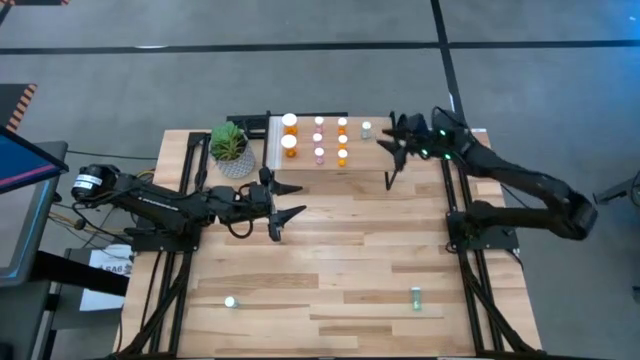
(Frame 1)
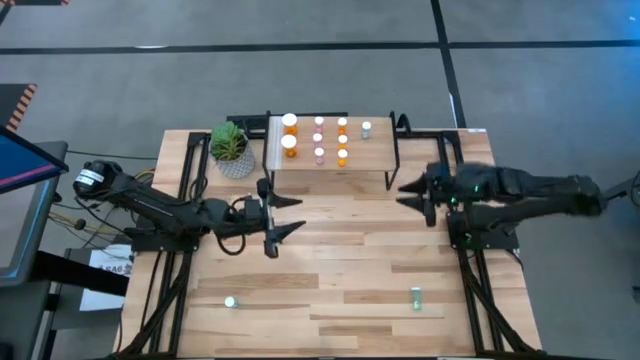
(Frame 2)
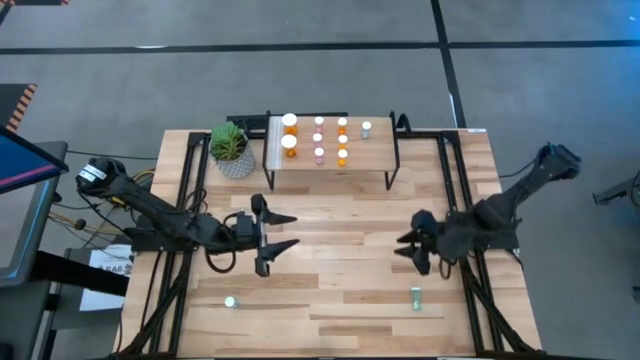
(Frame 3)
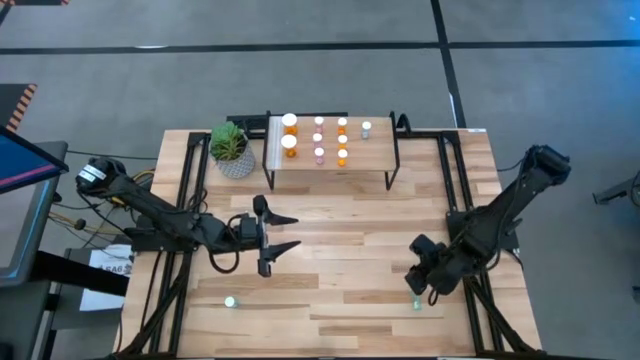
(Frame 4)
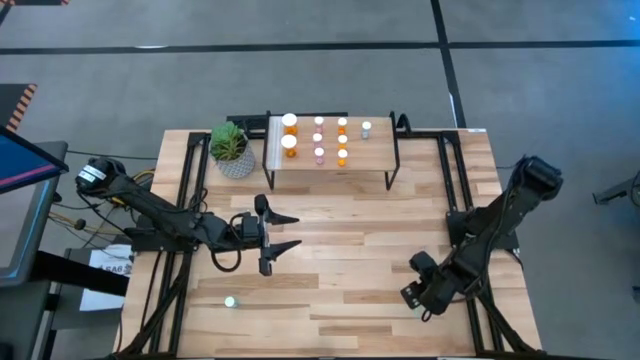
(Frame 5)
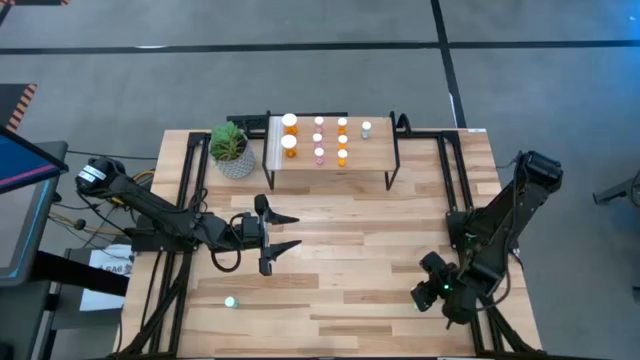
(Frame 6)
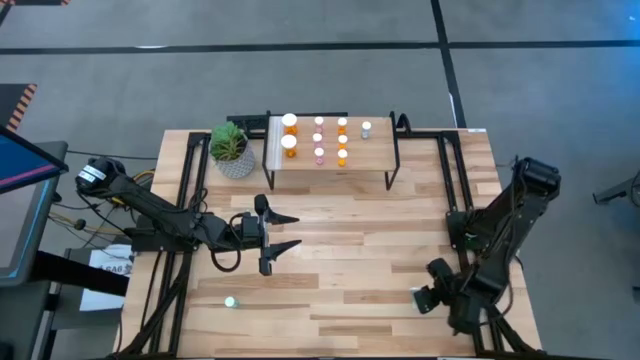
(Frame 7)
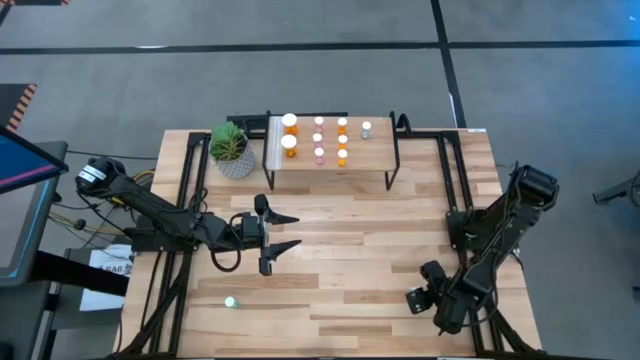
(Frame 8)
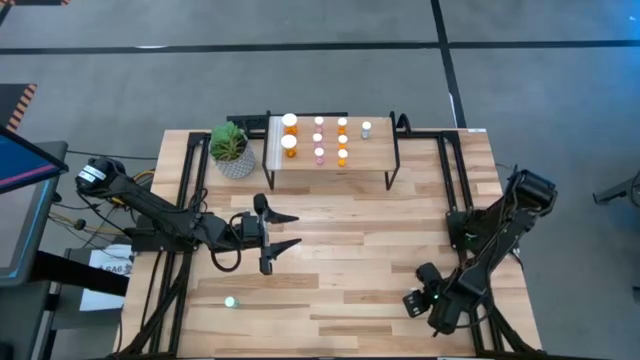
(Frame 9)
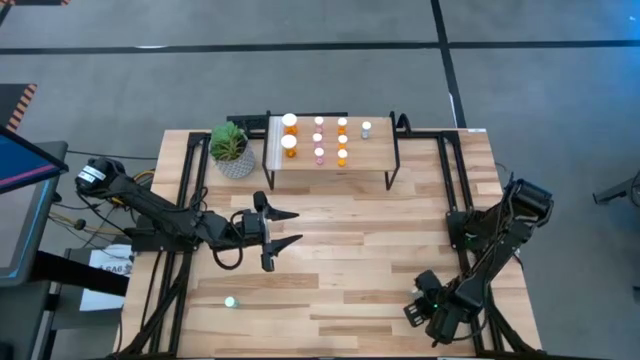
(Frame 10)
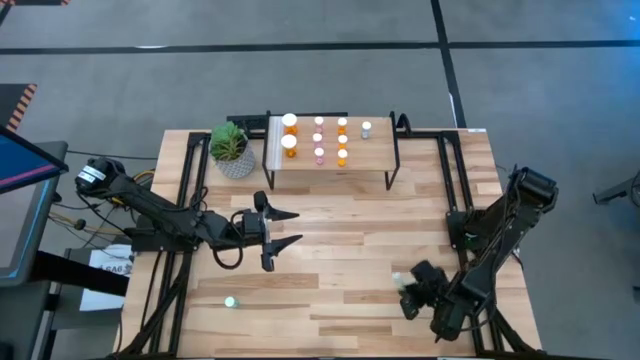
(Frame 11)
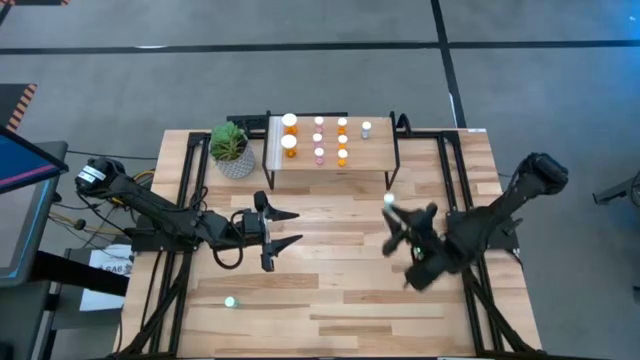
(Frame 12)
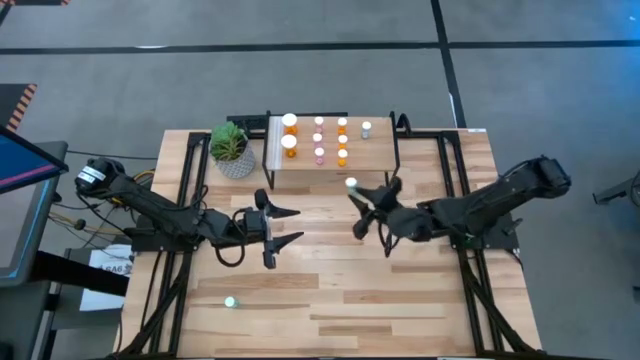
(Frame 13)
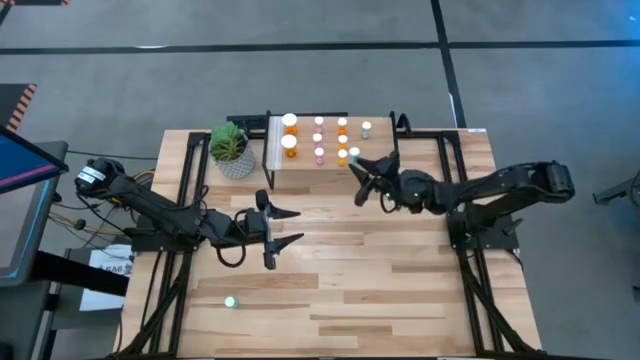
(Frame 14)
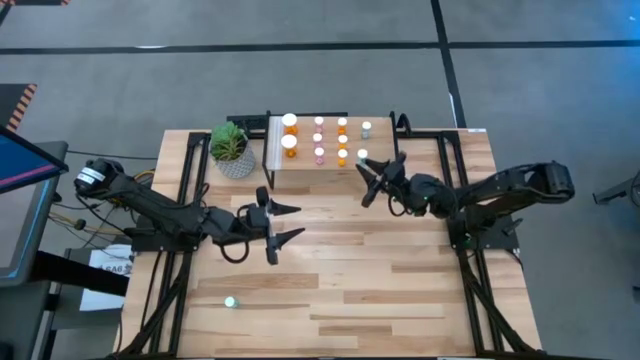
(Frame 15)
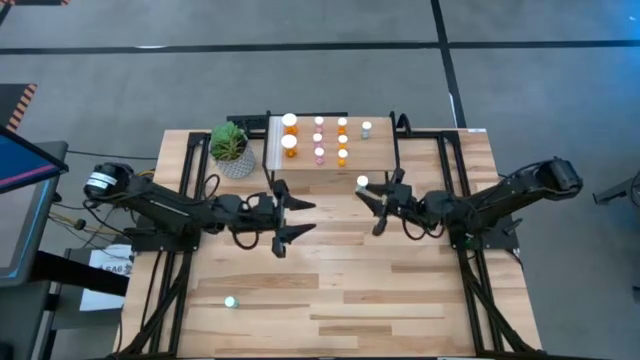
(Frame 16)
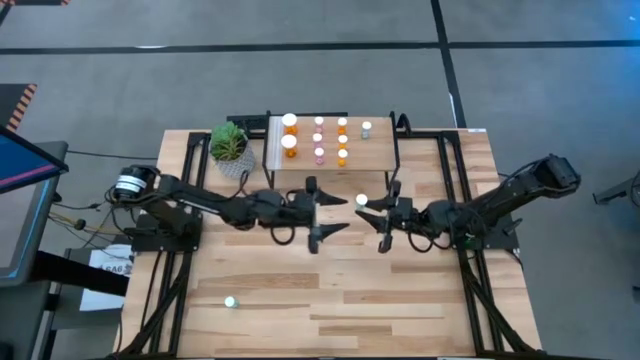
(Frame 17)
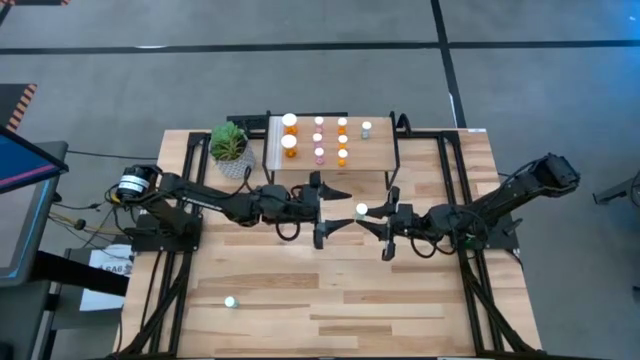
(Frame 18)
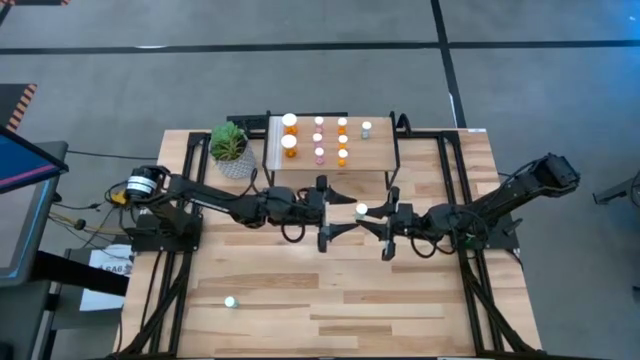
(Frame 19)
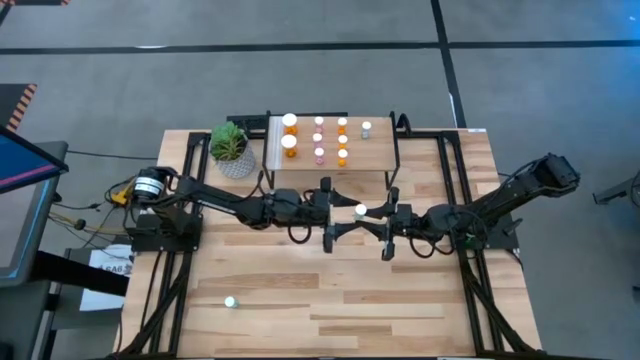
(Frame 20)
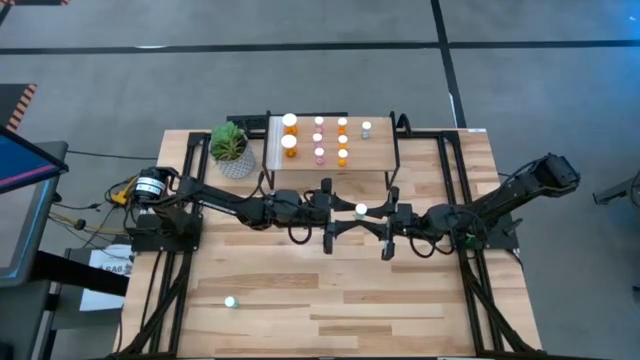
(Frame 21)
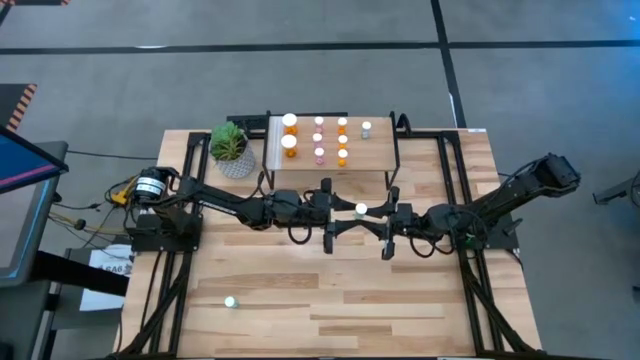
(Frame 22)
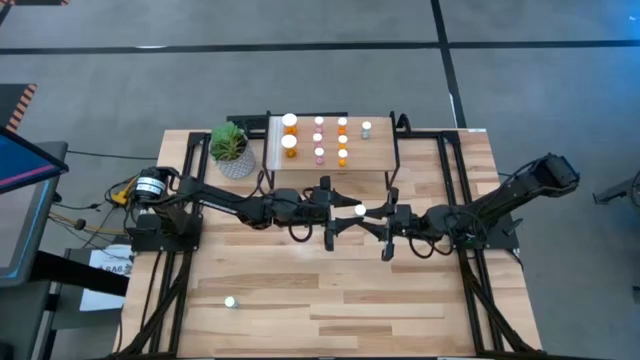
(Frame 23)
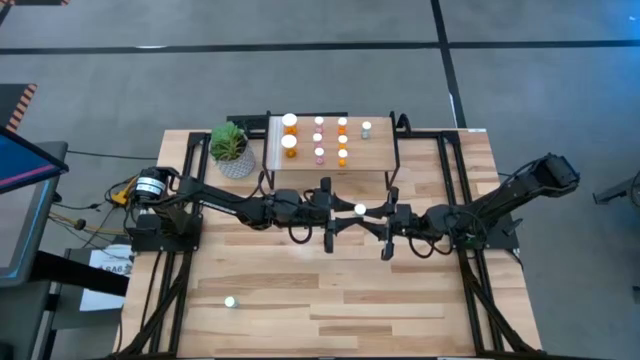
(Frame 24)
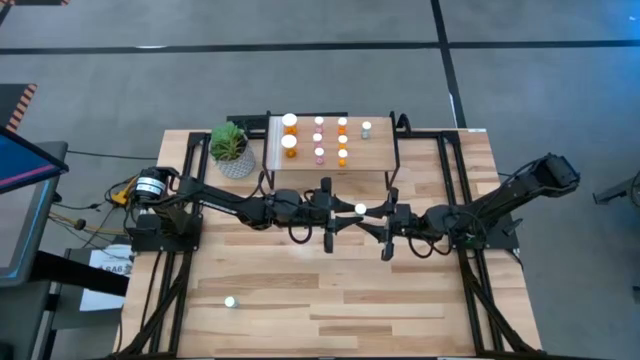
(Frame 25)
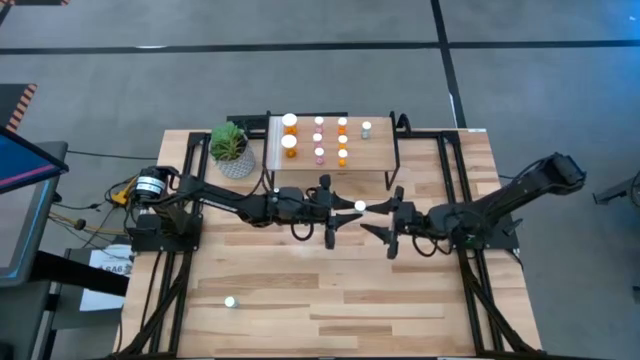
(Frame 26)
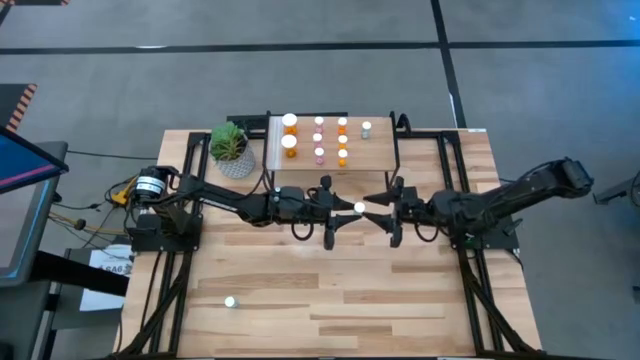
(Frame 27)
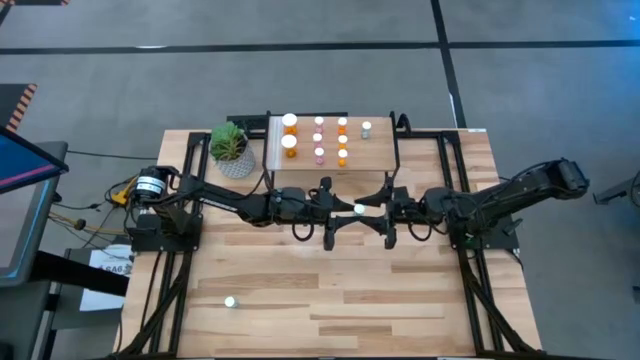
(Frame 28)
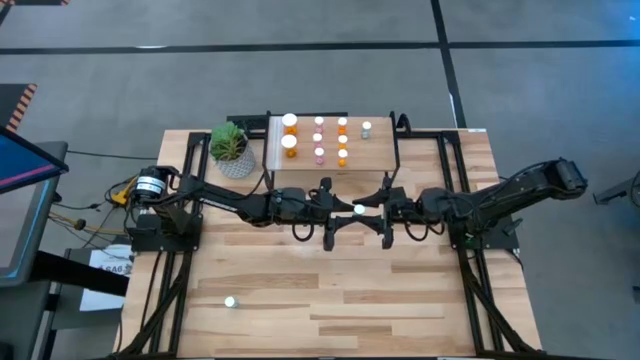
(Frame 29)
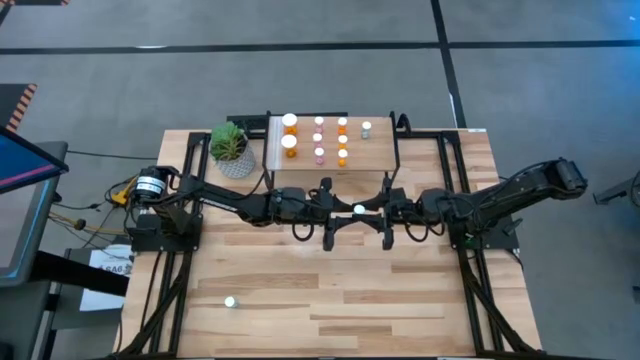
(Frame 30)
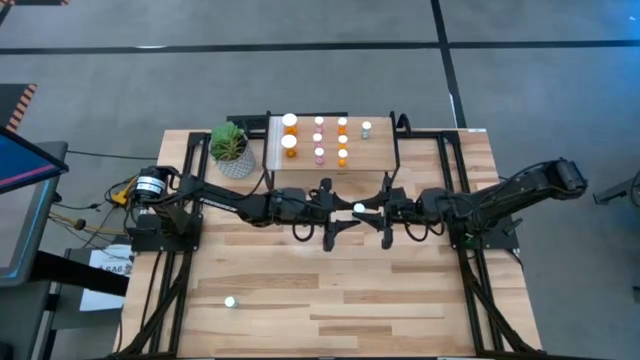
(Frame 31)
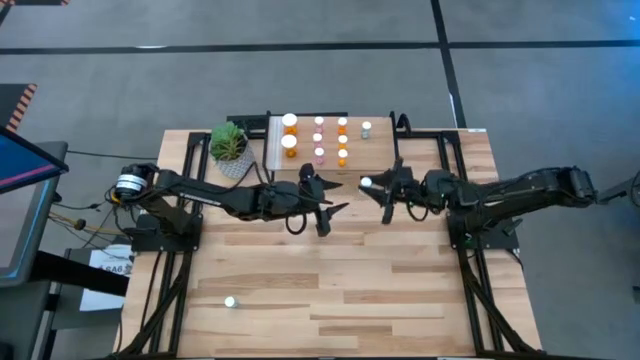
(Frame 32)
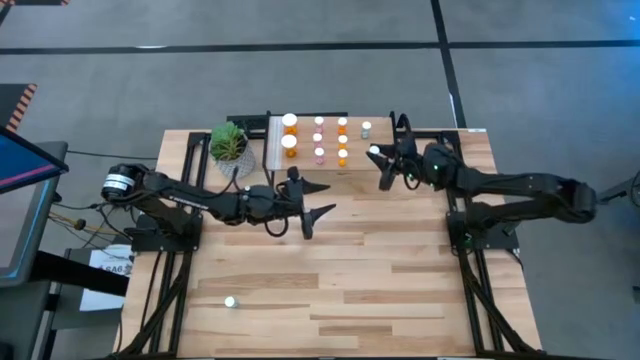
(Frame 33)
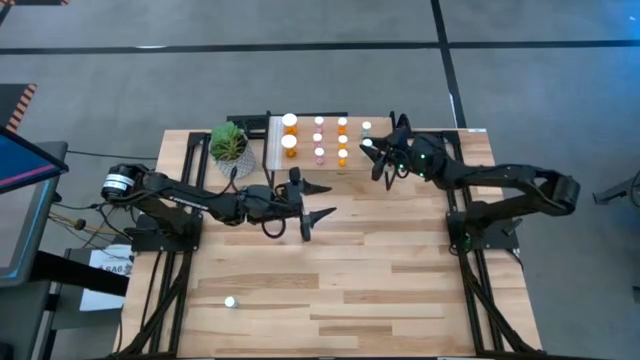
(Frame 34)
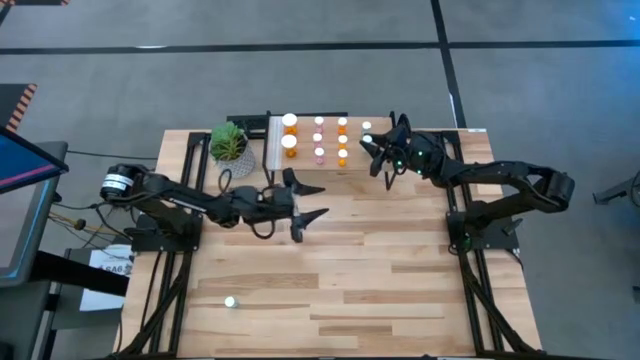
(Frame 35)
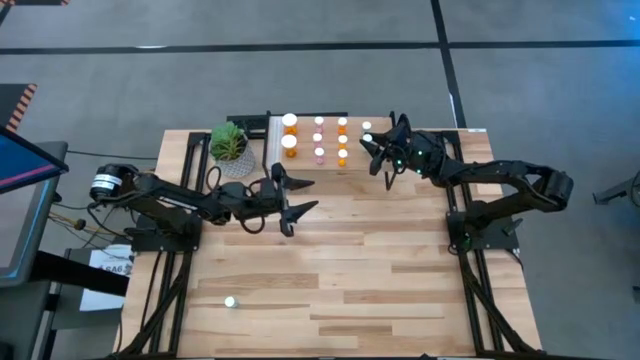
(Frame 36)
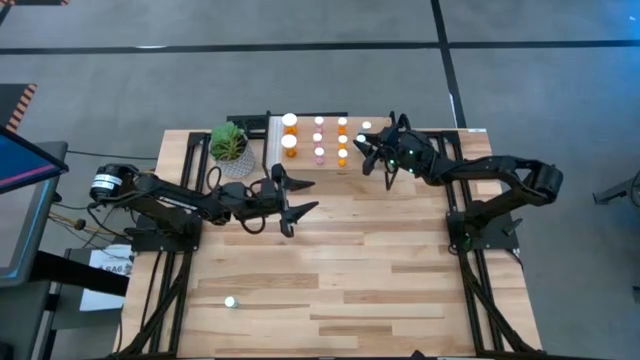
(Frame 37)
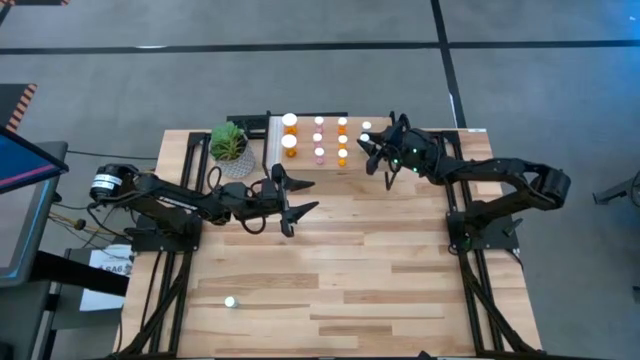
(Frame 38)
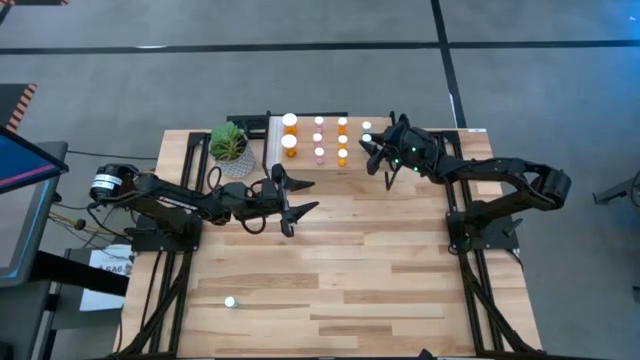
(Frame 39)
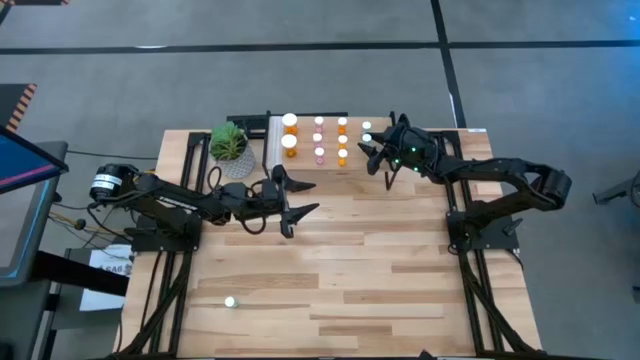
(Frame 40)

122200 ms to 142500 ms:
Task: Pick and place medicine bottles onto shelf by color
Put the right blue pill bottle aligned with the other blue pill bottle on the shelf

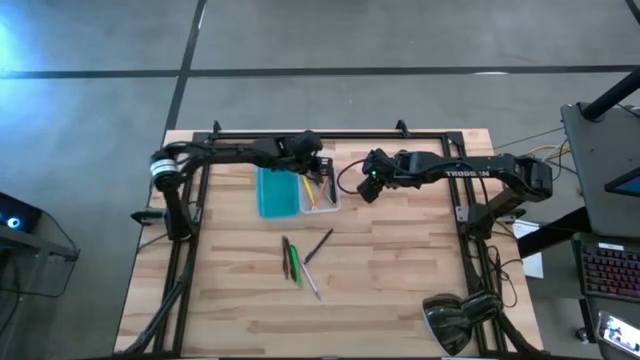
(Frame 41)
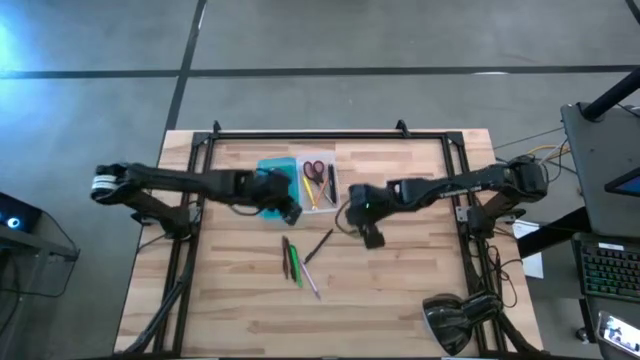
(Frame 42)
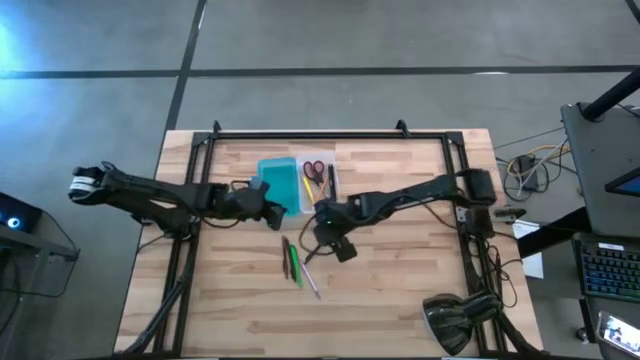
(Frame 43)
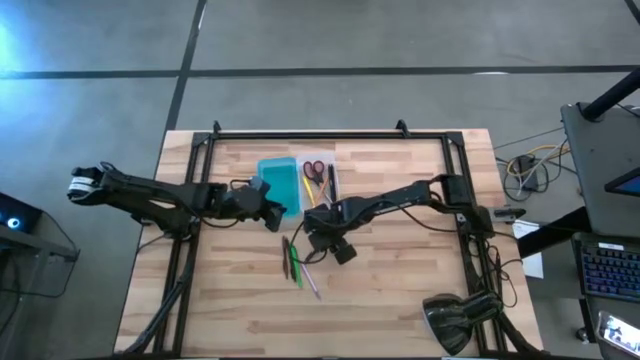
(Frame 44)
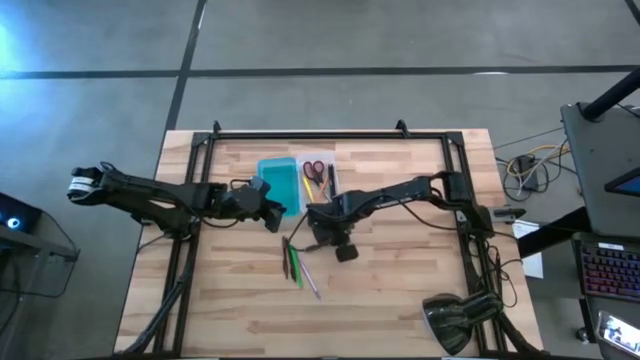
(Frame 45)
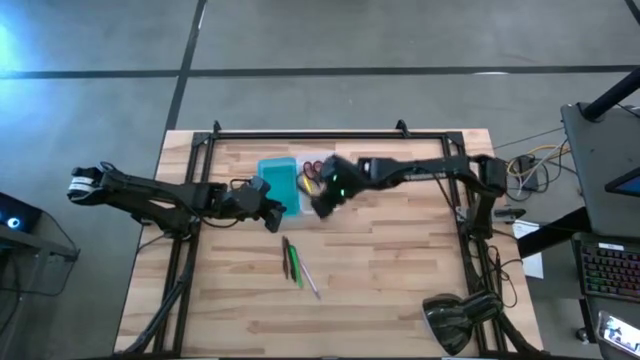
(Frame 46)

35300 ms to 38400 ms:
Task: Pick & place school supplies into a supply box
Put the black pen into the pencil box
